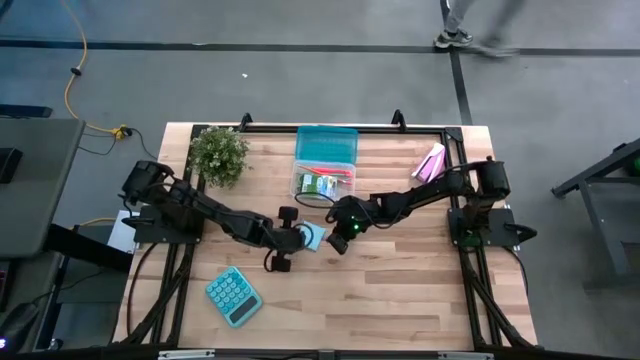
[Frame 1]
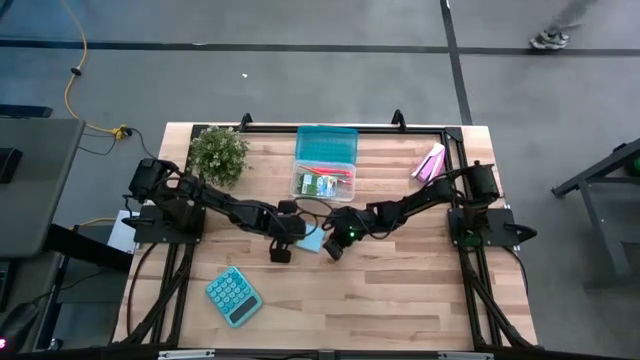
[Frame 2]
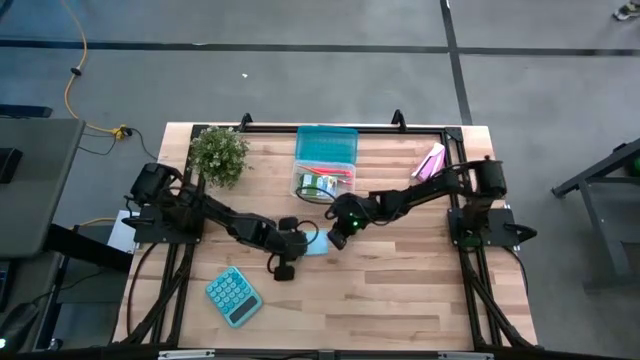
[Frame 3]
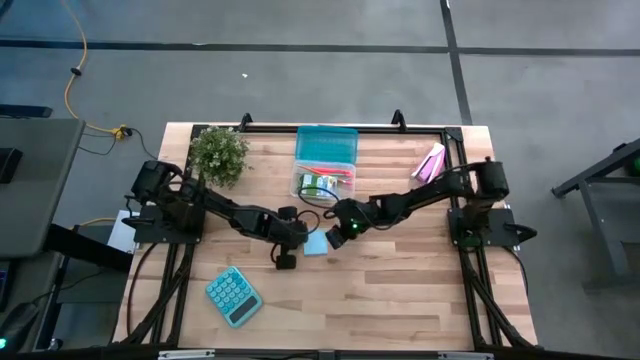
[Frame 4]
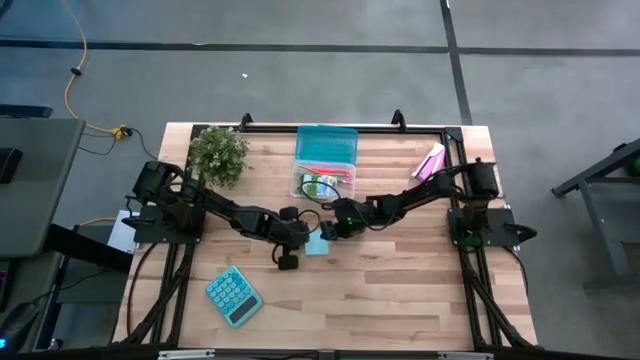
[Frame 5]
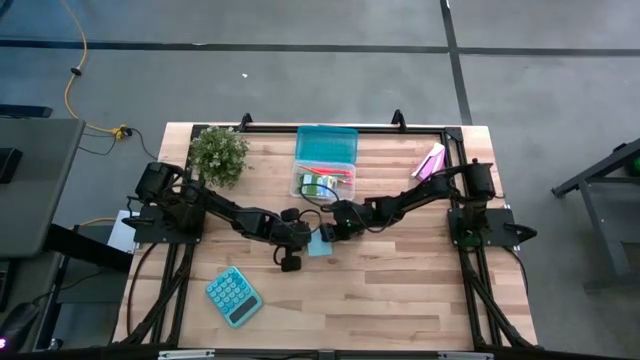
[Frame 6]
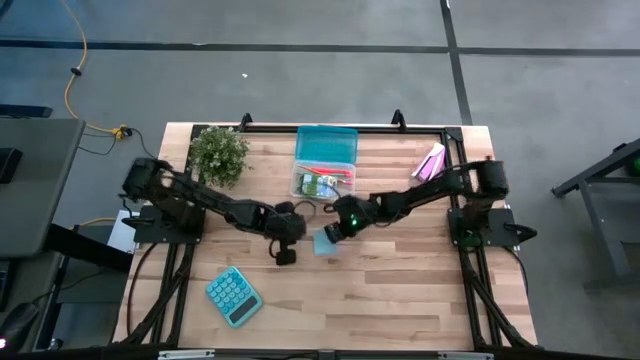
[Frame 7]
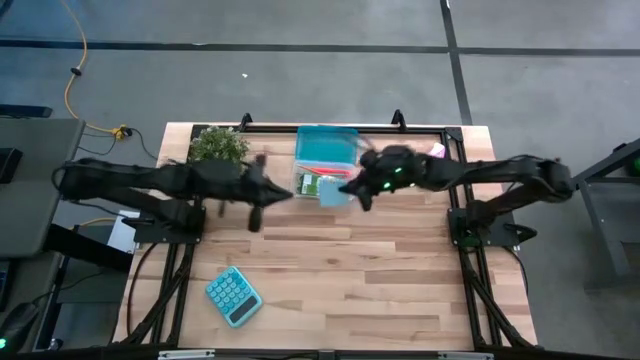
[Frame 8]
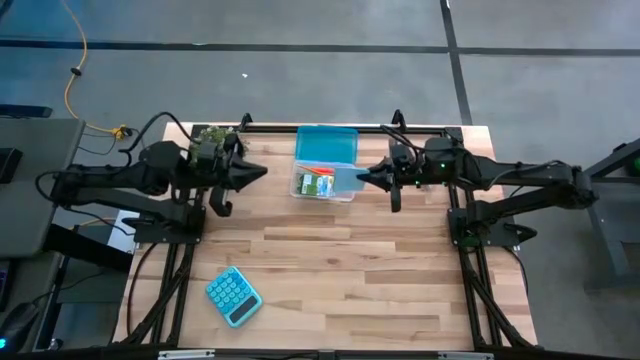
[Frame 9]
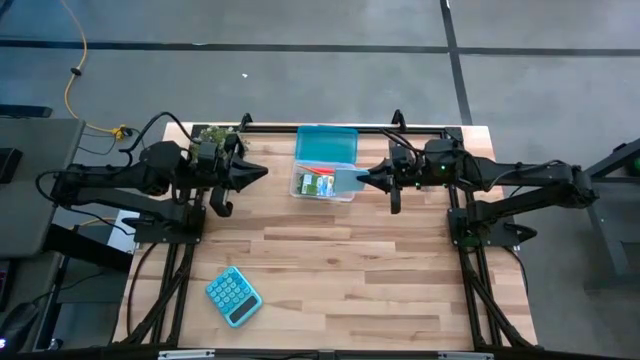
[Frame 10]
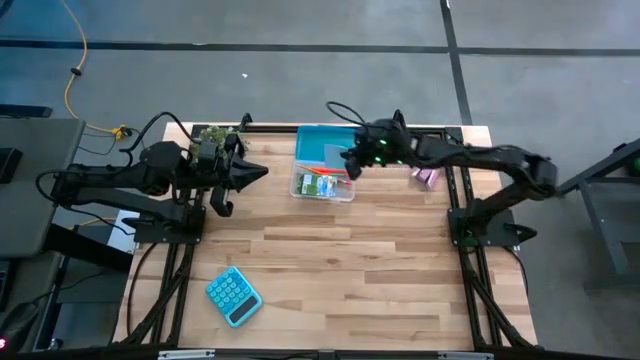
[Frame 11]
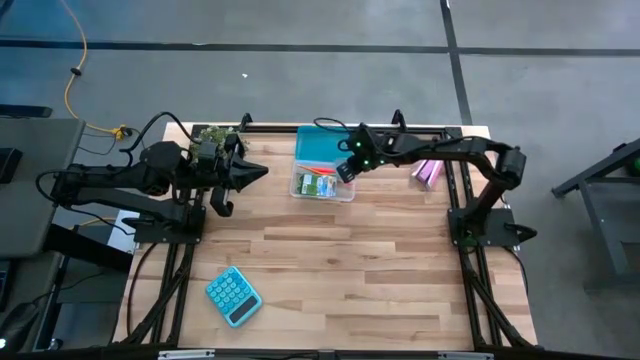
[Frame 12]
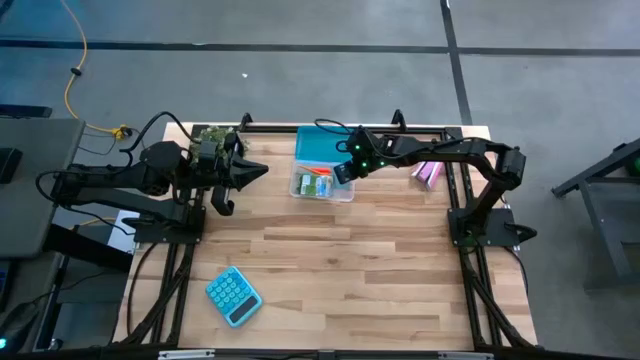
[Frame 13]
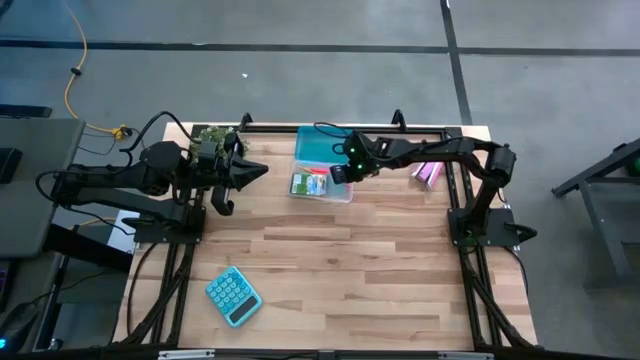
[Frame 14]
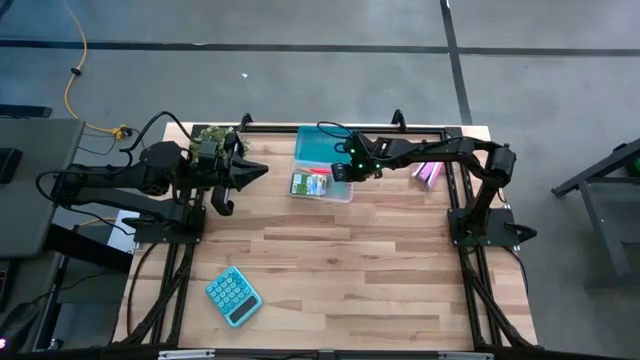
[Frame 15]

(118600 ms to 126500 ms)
Task: Pack school essentials
Put the blue sticky note in the supply box

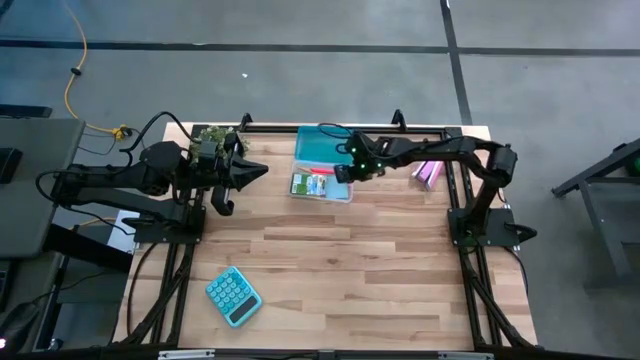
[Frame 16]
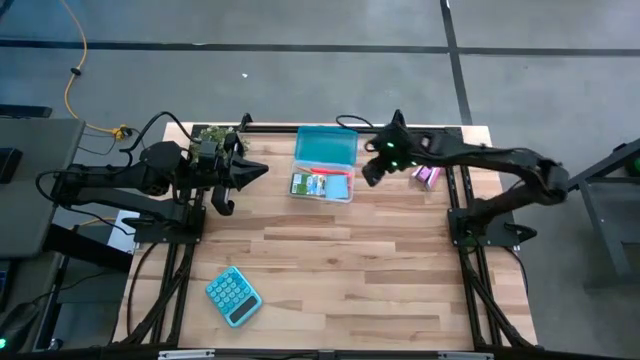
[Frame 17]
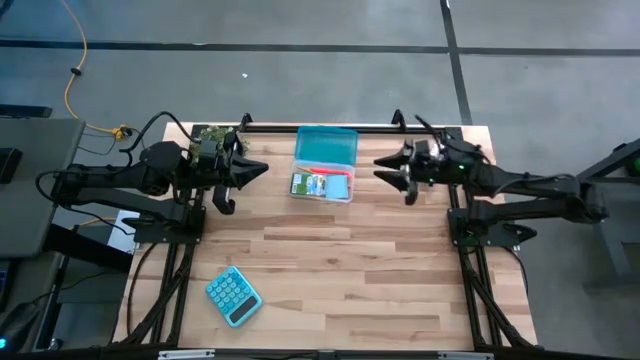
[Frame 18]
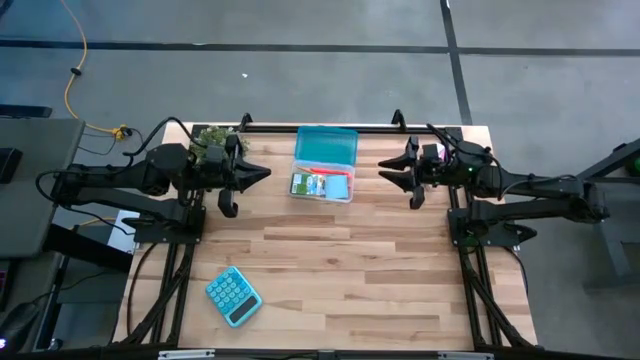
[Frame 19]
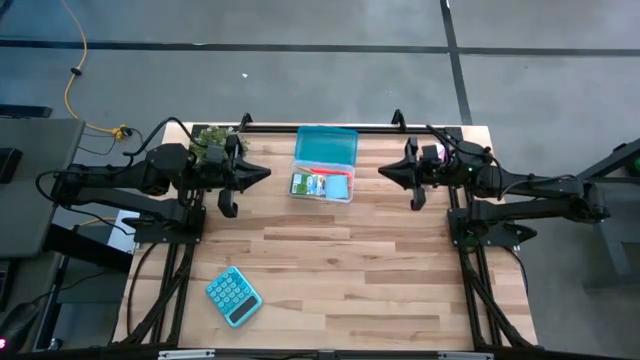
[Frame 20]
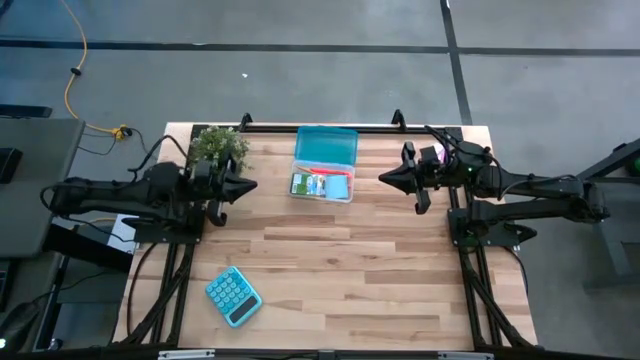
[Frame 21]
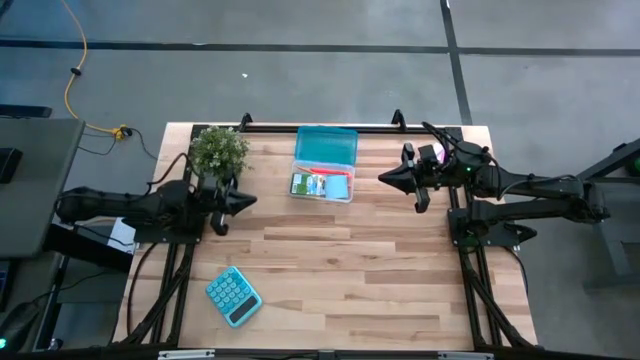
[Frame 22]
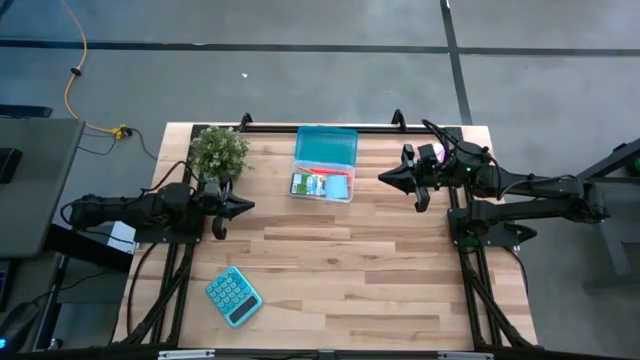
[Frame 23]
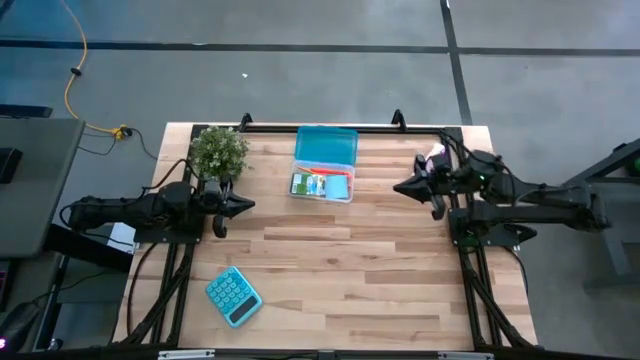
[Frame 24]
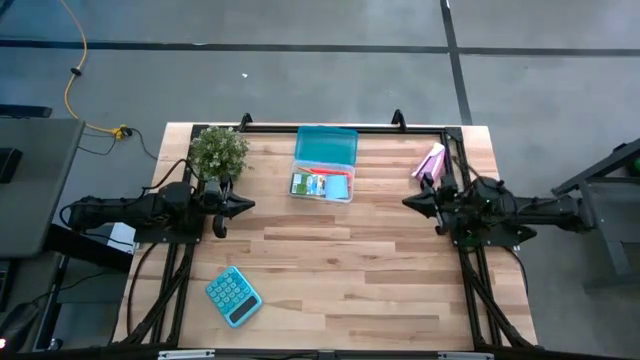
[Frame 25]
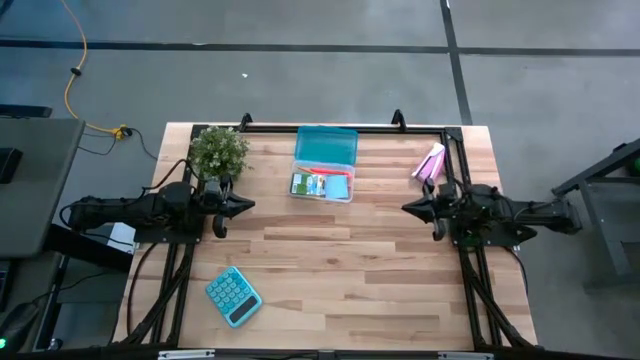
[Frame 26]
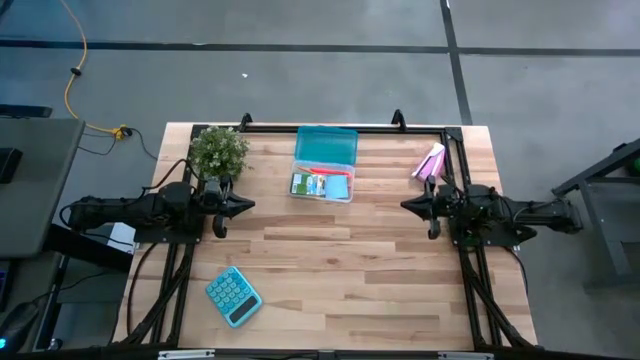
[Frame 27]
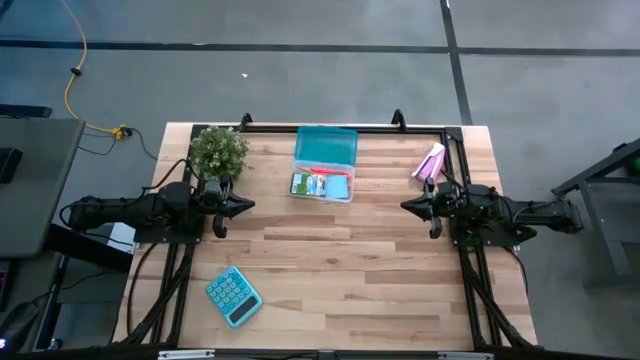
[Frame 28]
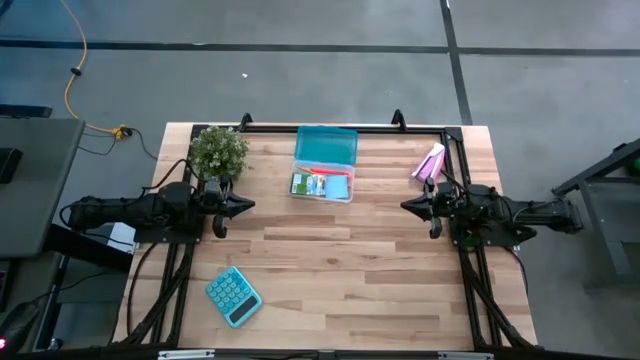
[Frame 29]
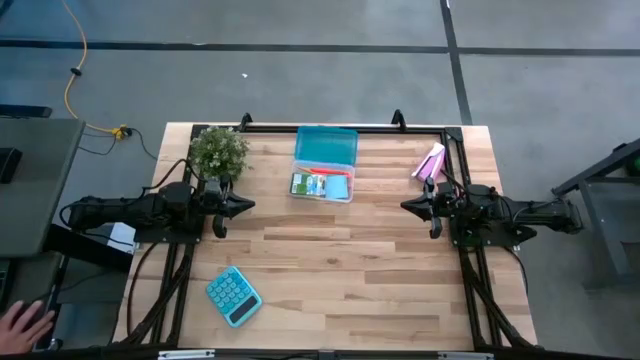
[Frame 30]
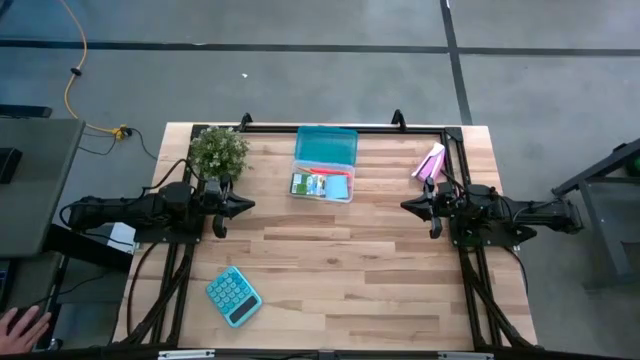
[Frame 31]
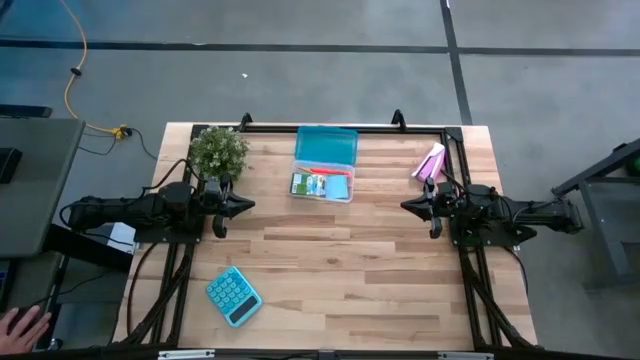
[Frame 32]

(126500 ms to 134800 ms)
Return to Home Position

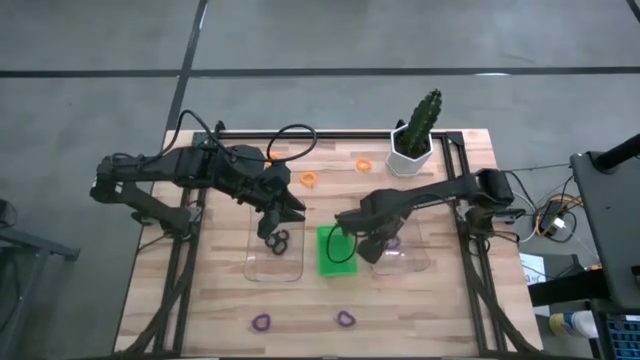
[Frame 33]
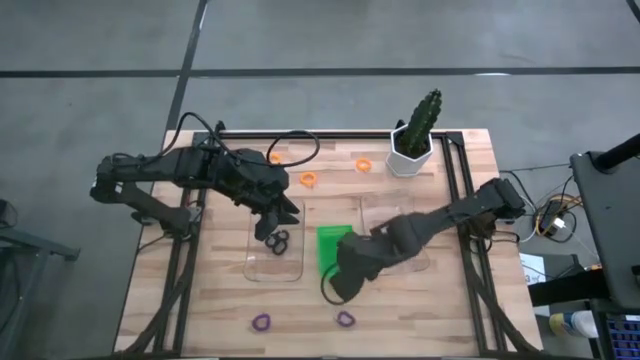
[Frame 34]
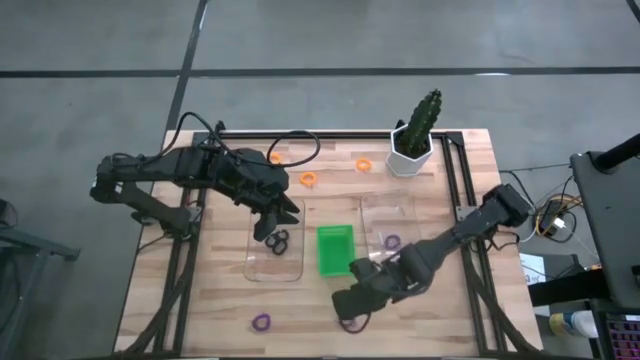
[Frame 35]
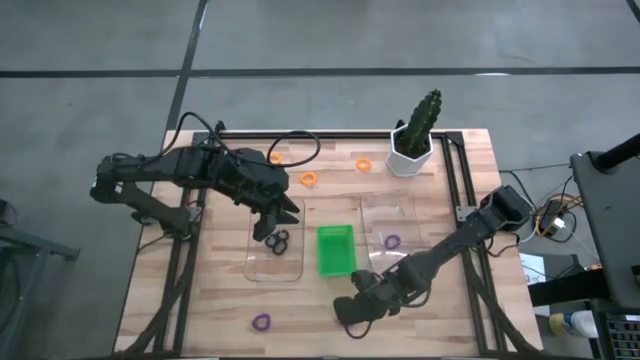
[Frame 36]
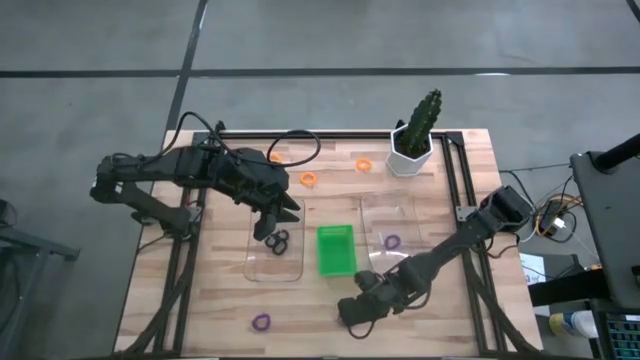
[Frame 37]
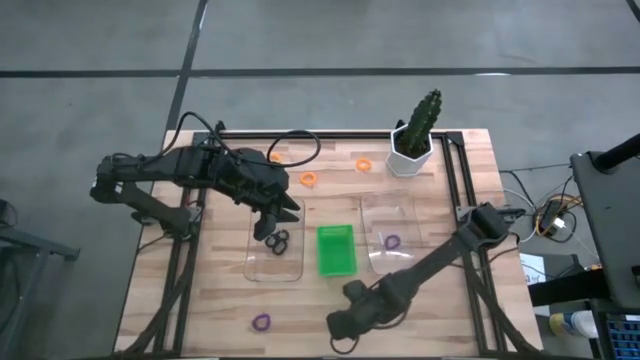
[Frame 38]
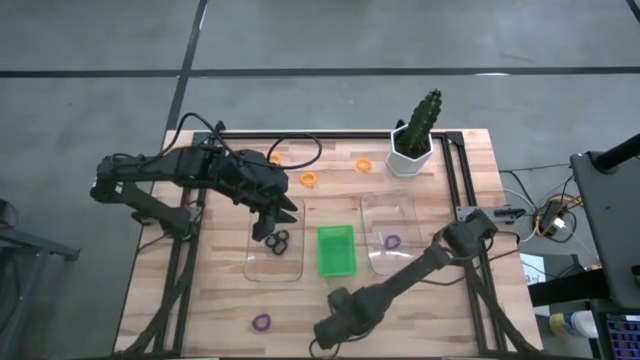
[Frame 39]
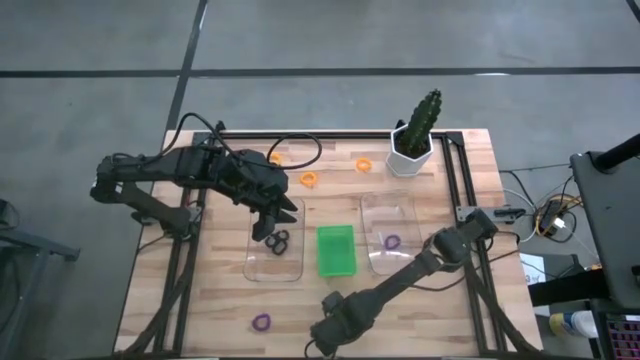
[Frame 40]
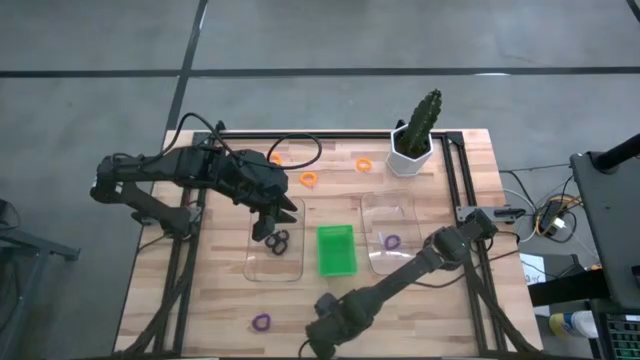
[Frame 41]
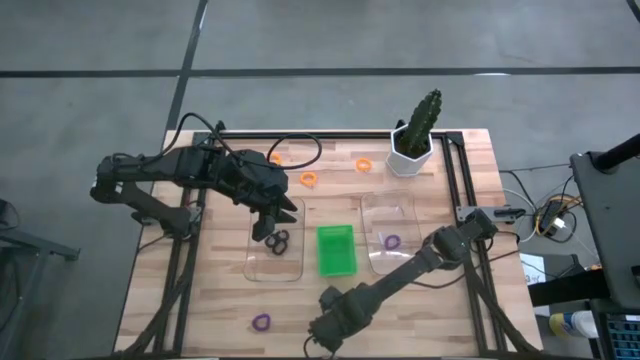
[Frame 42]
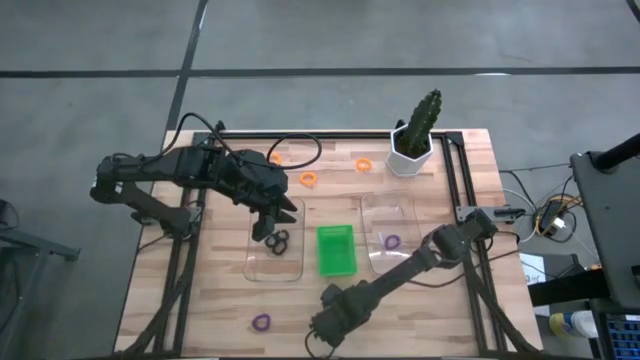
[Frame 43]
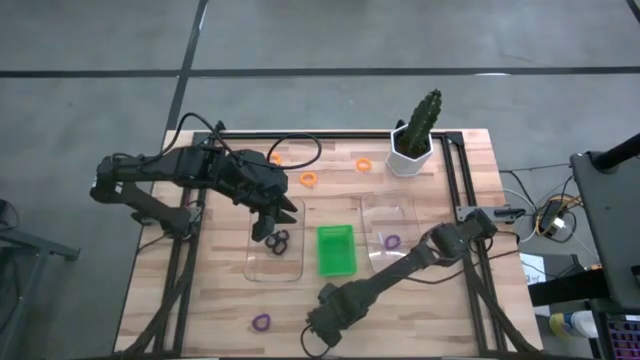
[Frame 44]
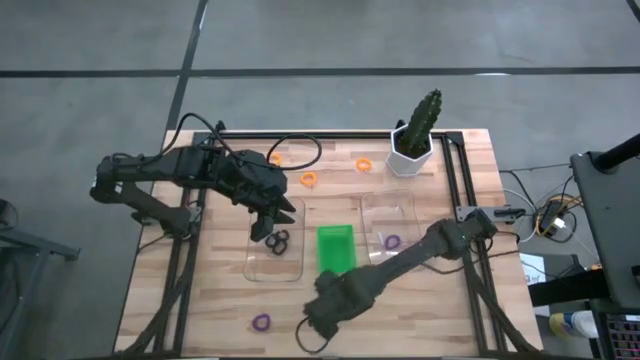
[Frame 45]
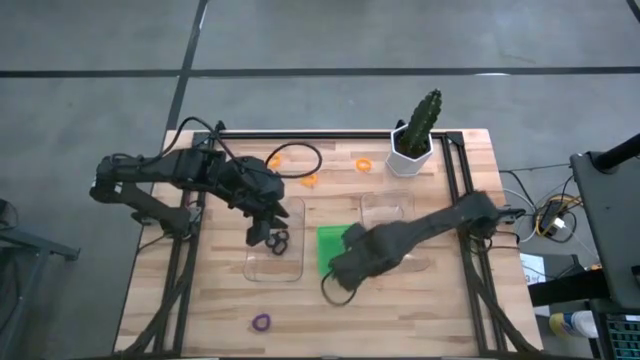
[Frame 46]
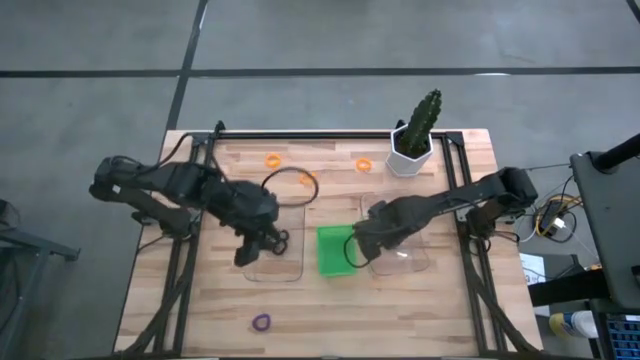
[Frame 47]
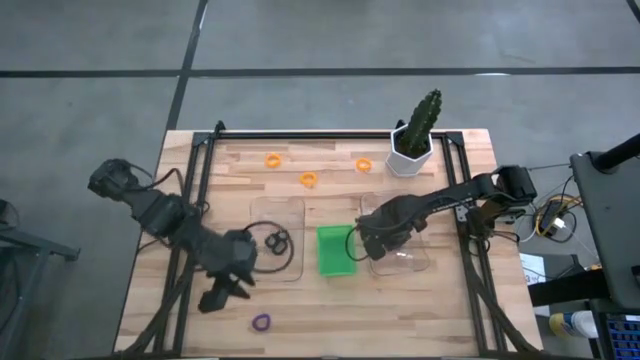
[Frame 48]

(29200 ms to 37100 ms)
Task: Sort spring keychains
Put the right violet spring keychain into the right transparent bin
